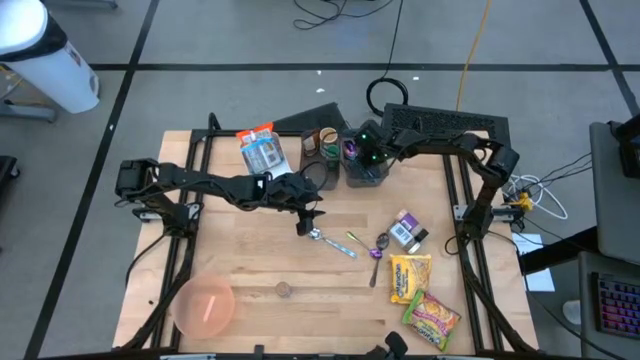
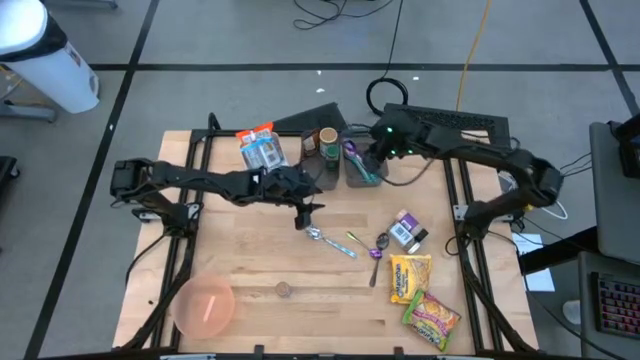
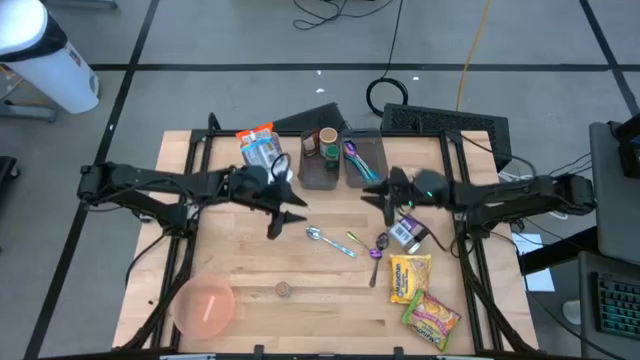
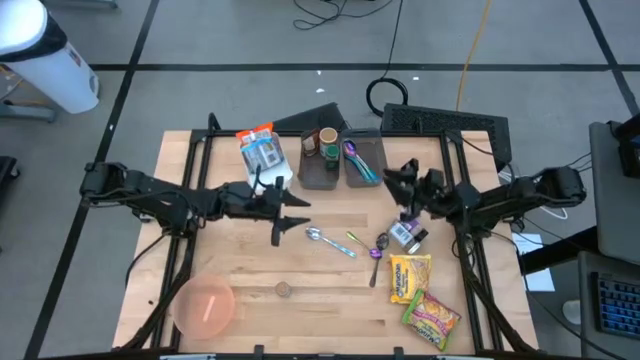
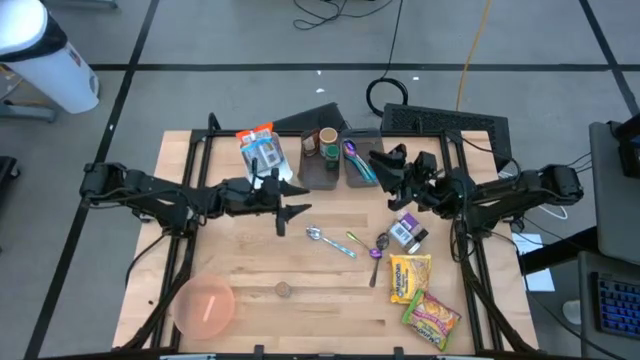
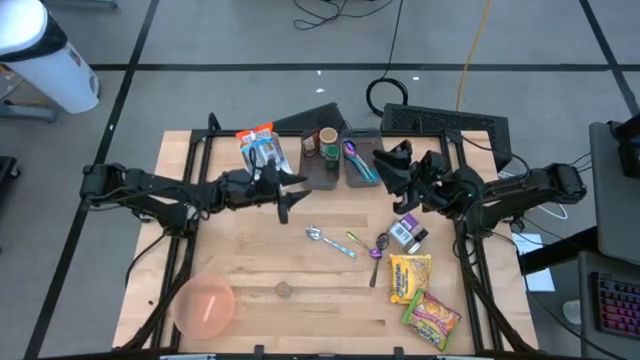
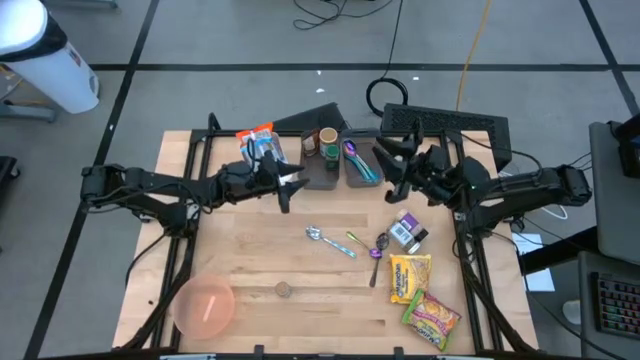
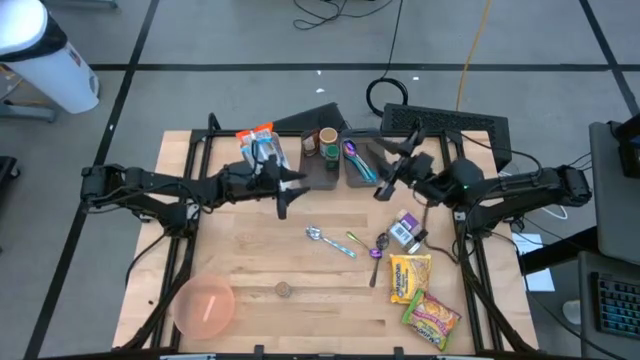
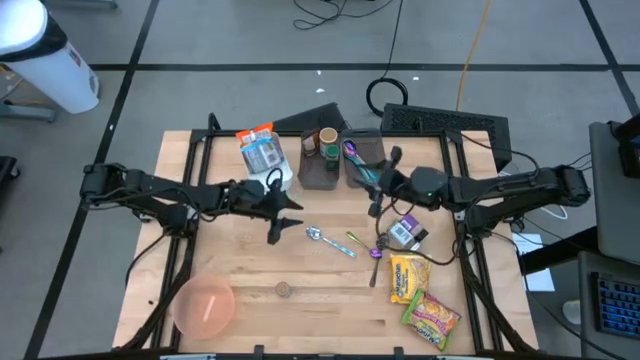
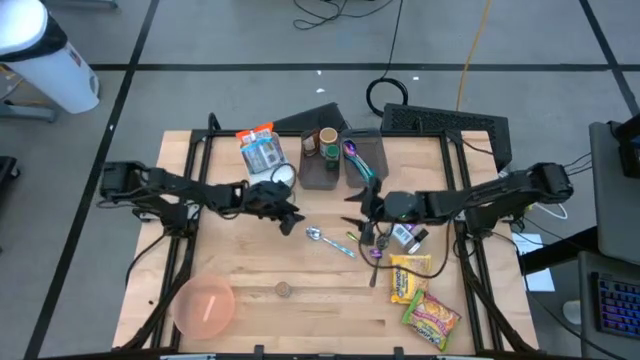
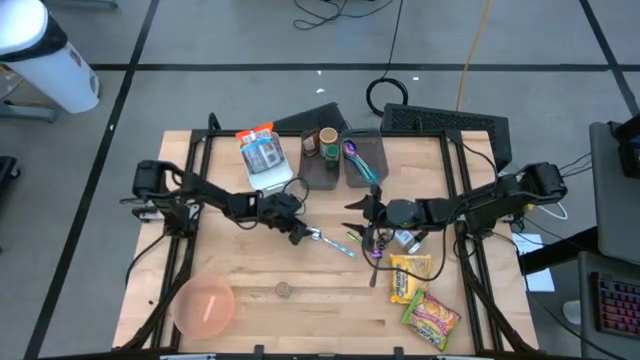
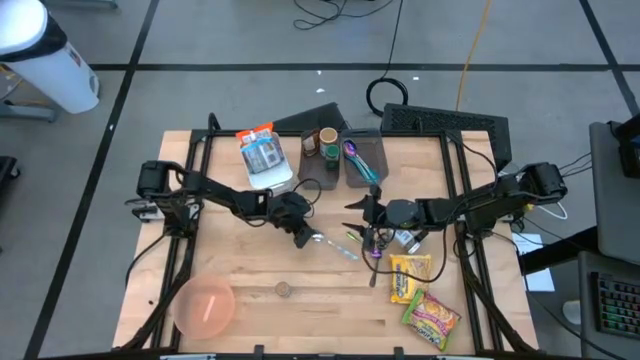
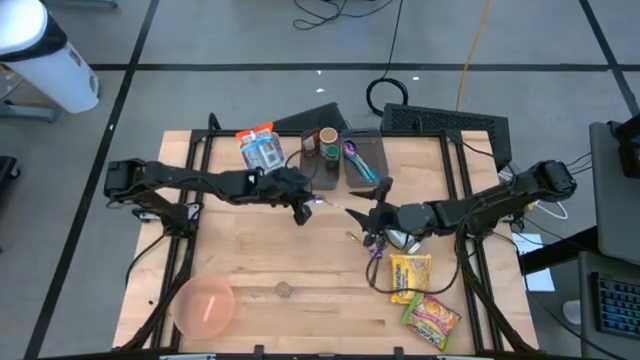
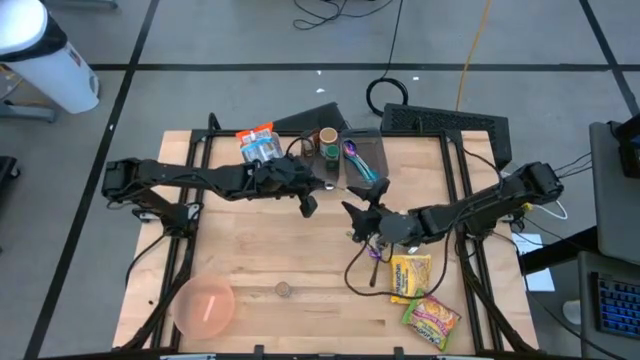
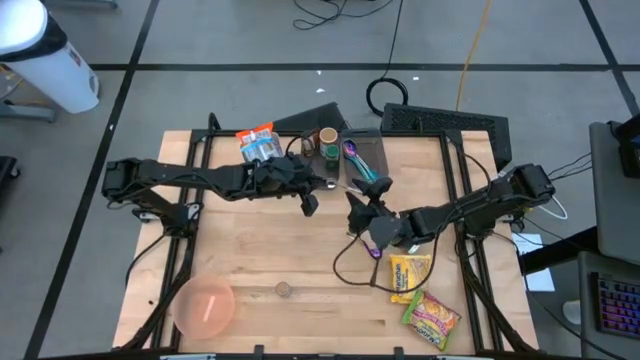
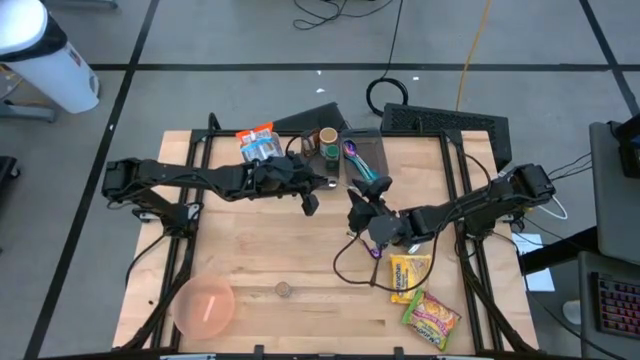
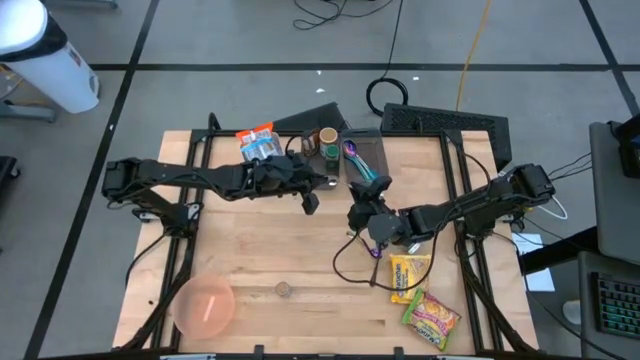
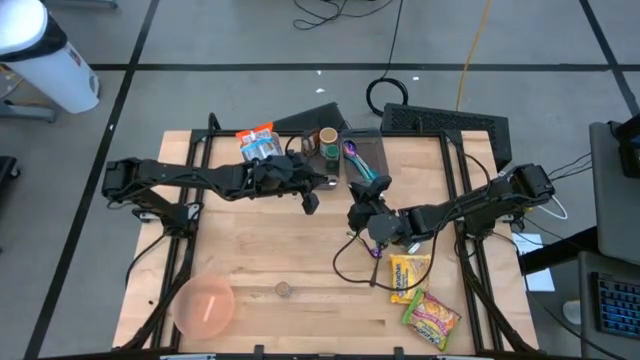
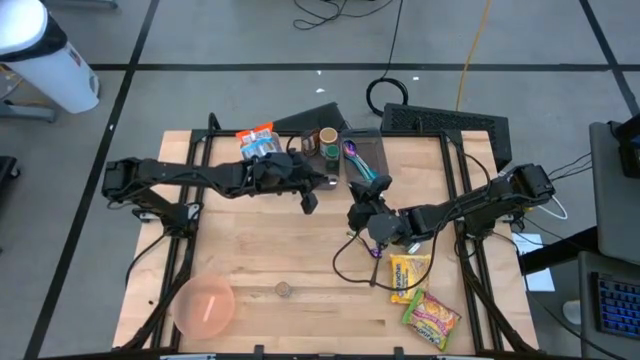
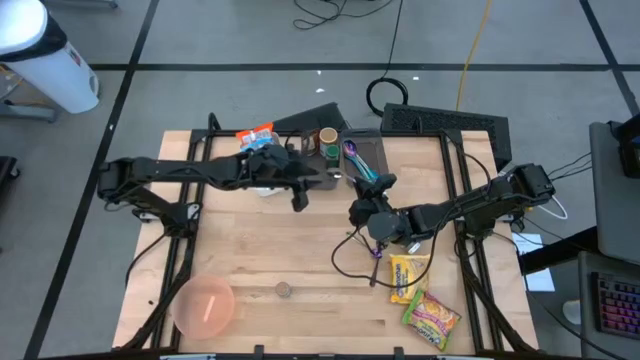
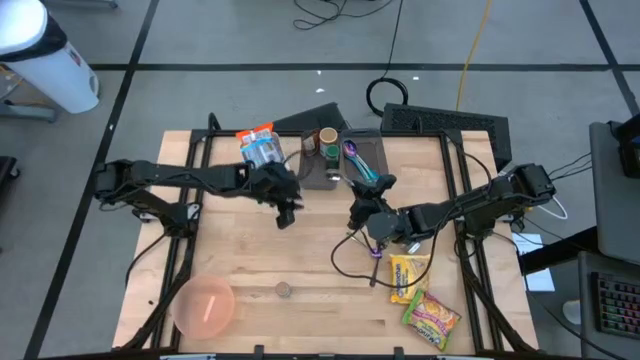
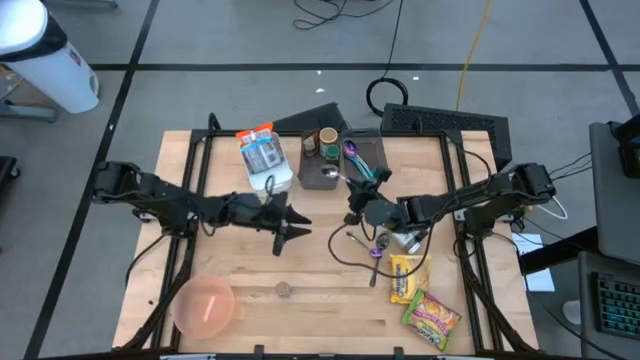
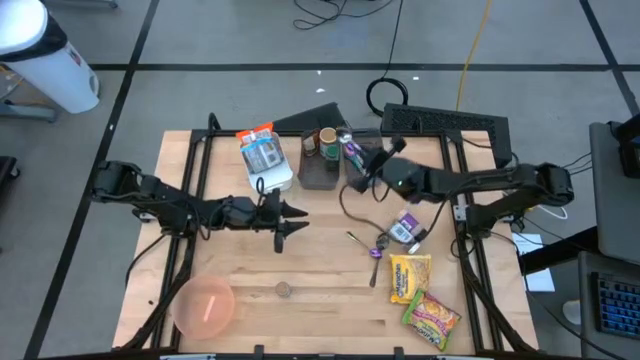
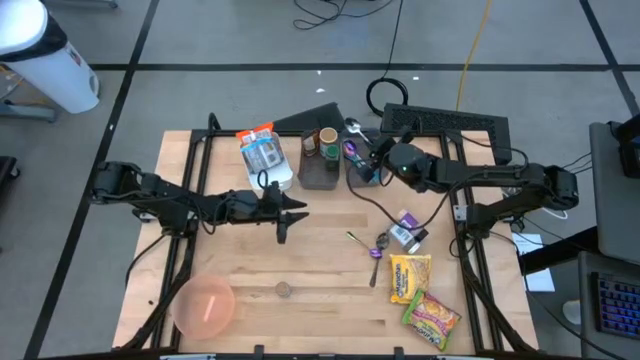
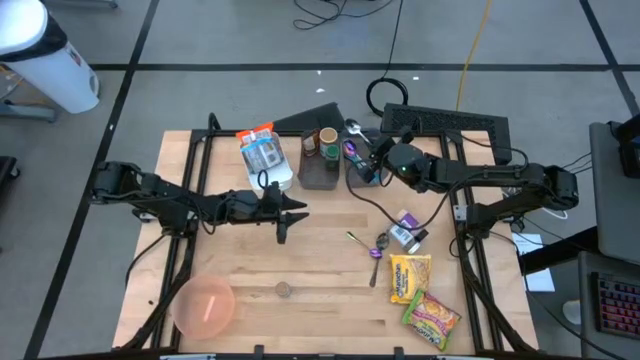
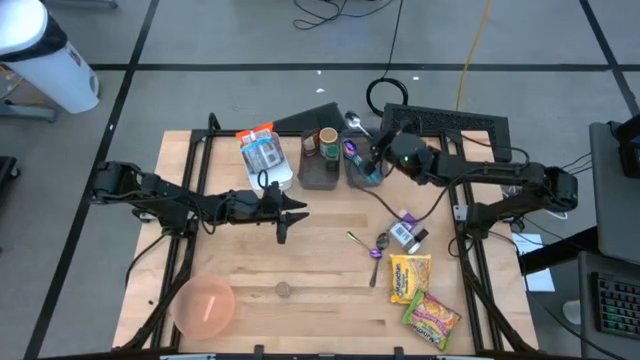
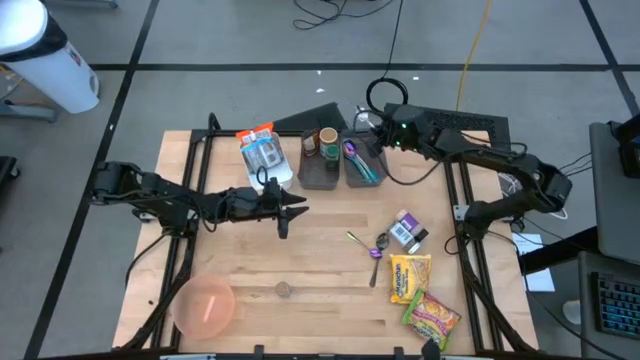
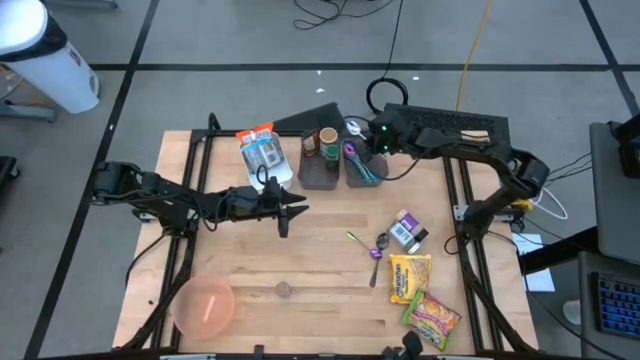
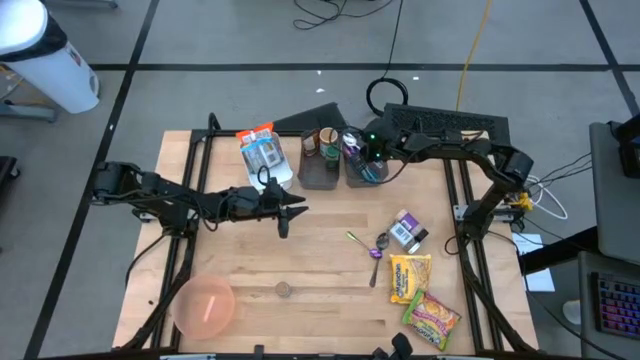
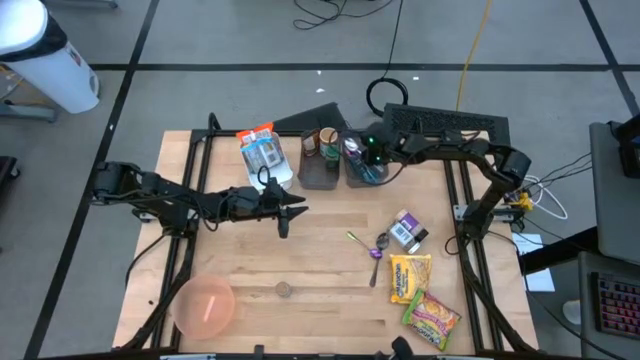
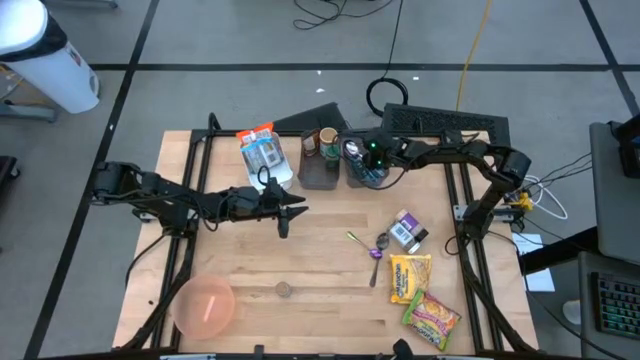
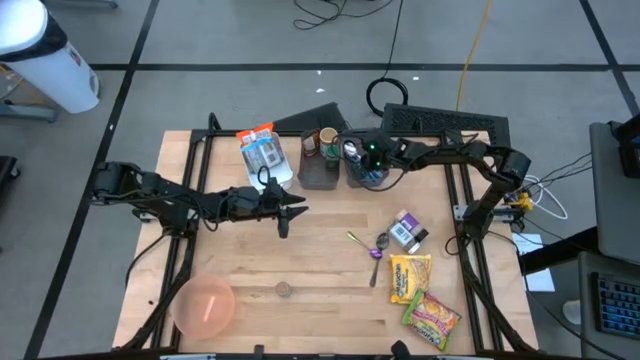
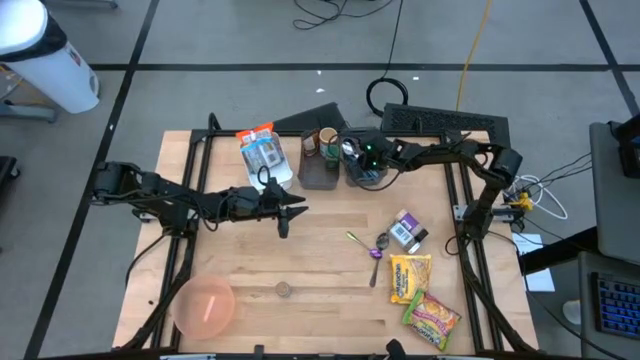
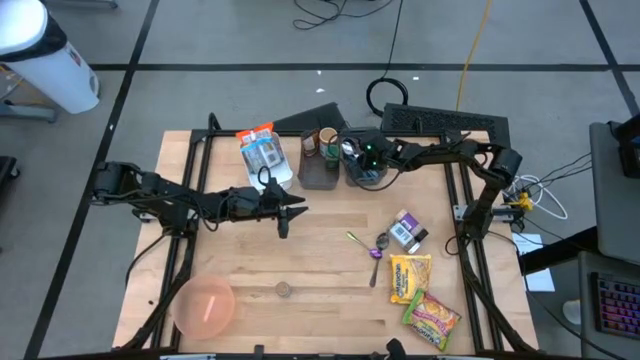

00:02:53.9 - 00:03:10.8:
Task: Pick & Place Food Item
Put the blue patterned spoon into the right black bin

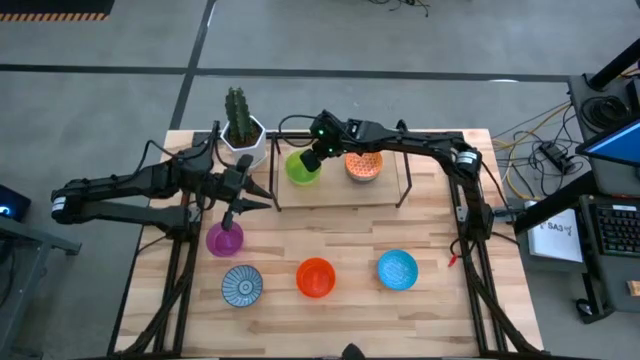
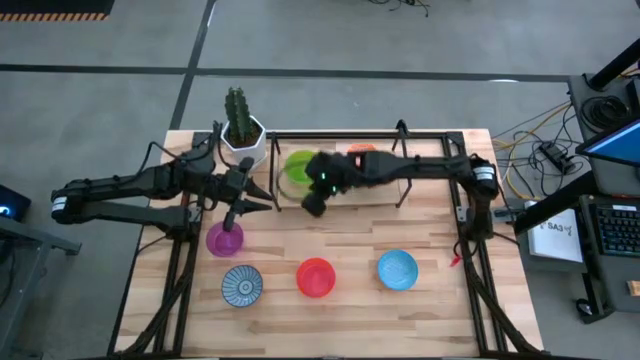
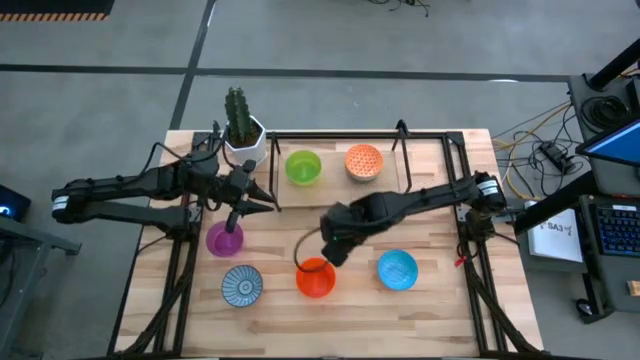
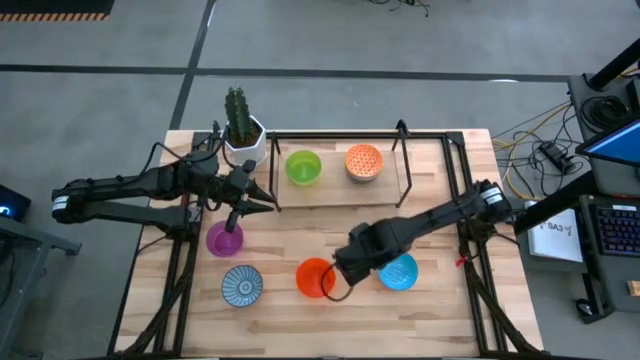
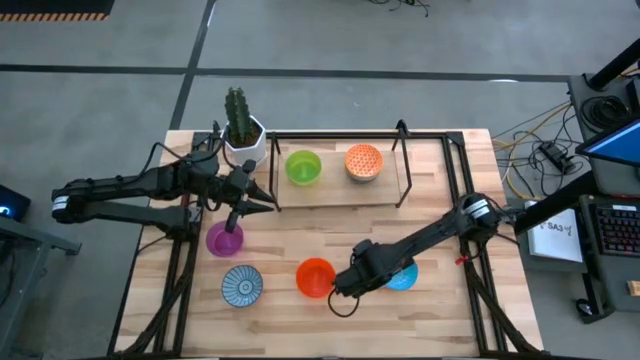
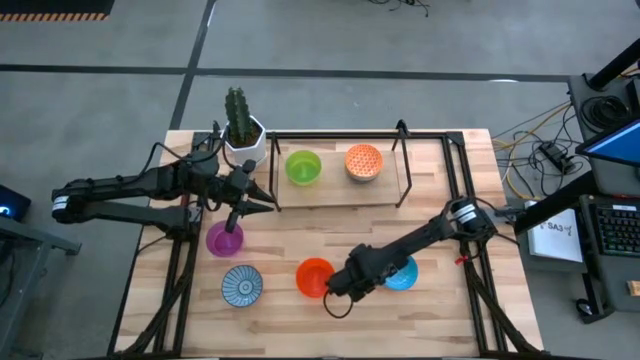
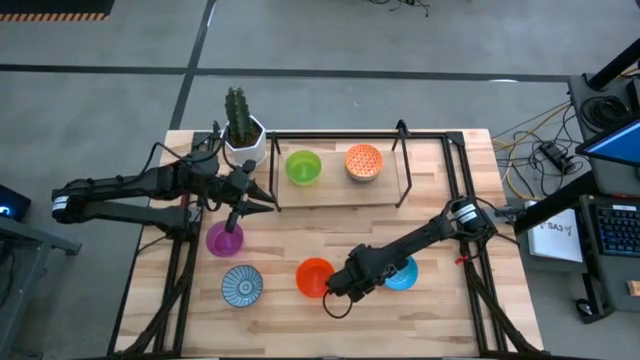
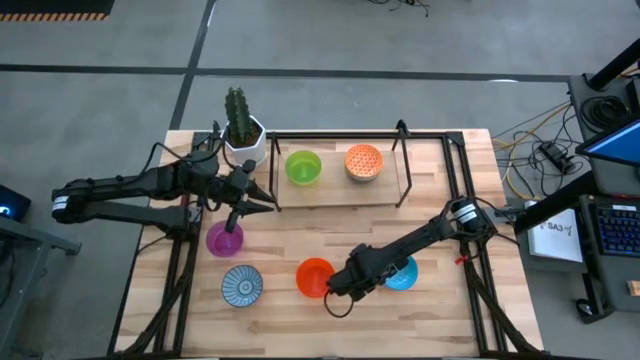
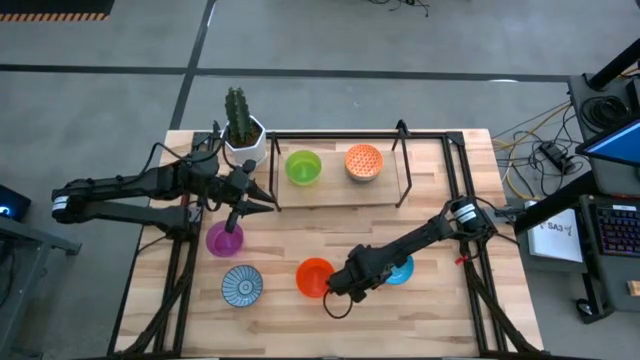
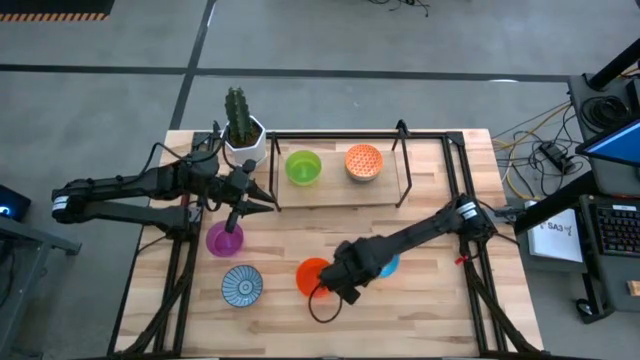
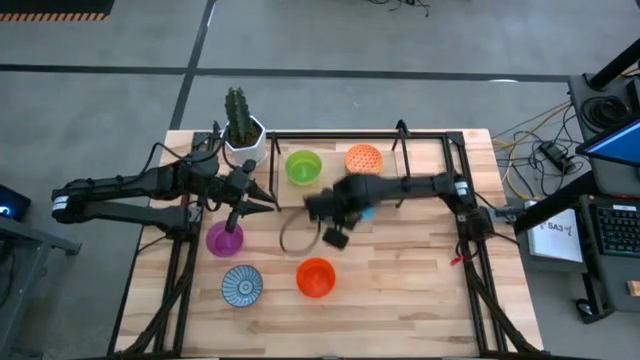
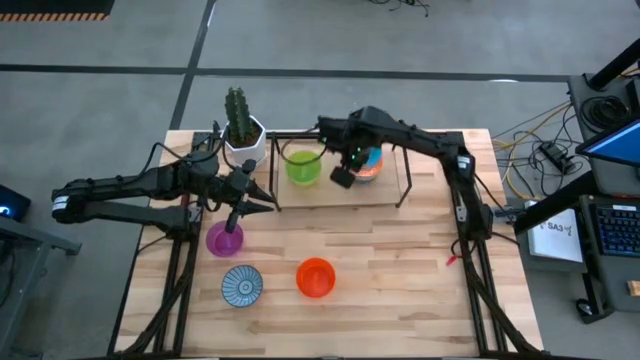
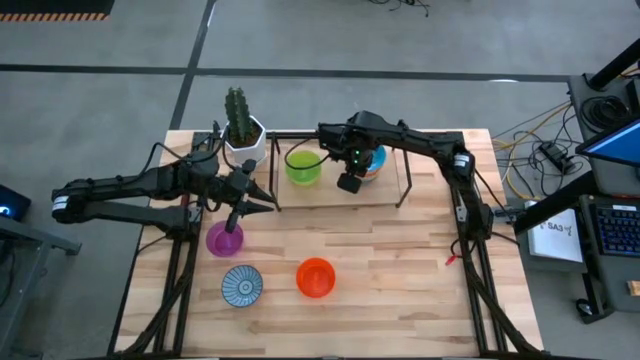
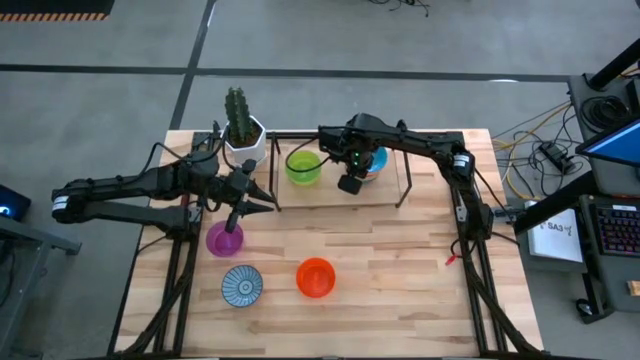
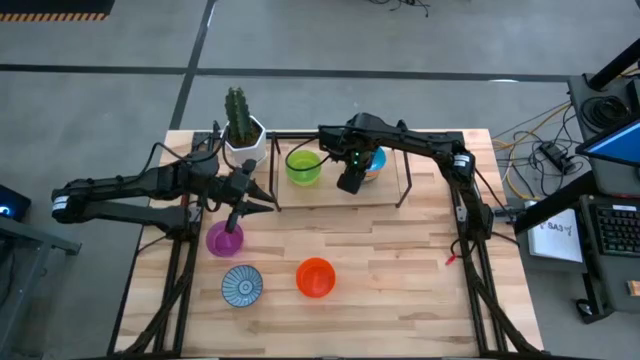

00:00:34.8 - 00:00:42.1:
Task: Place and stack bowls onto a shelf
Stack the blue pattern bowl on the orange pattern bowl
